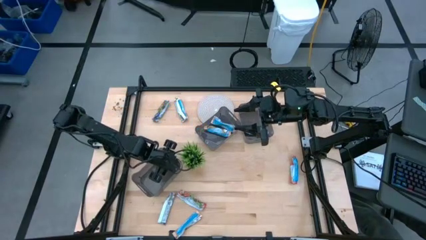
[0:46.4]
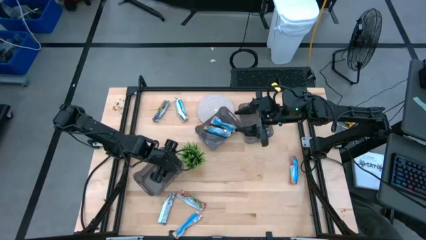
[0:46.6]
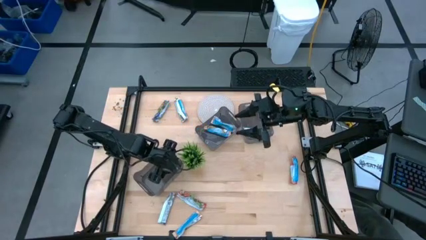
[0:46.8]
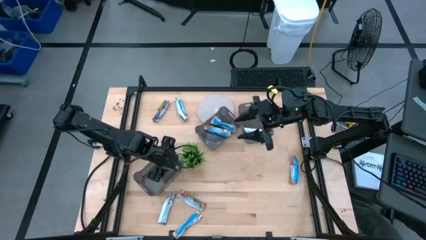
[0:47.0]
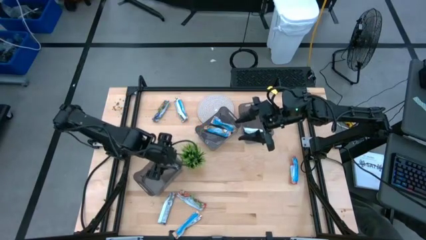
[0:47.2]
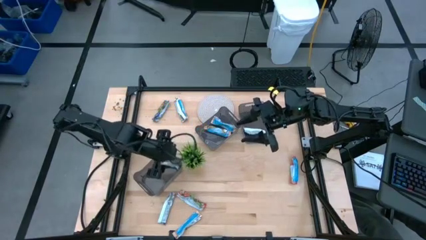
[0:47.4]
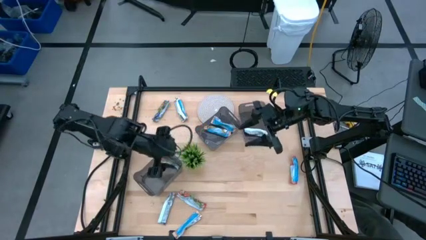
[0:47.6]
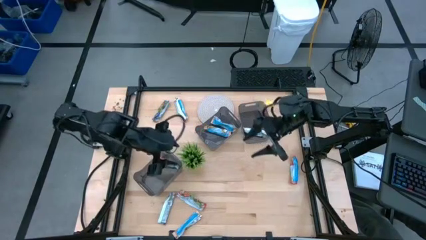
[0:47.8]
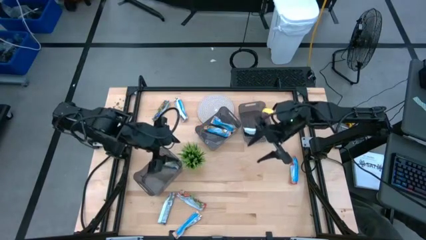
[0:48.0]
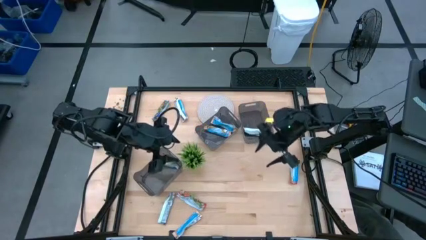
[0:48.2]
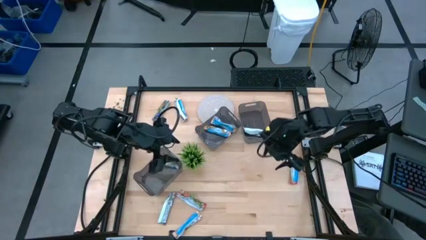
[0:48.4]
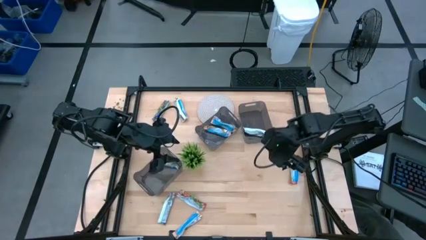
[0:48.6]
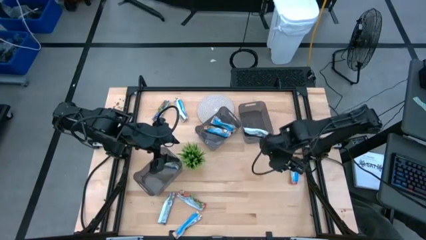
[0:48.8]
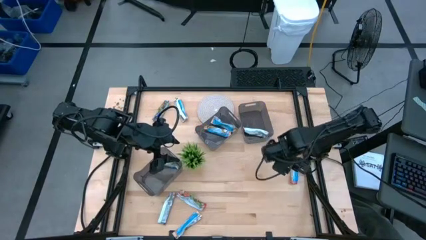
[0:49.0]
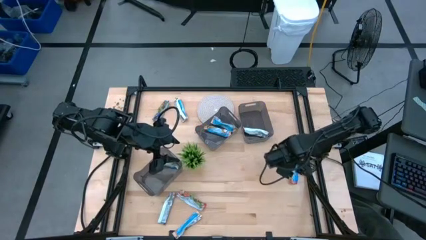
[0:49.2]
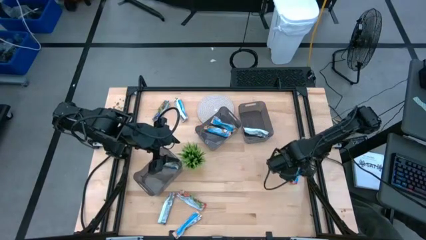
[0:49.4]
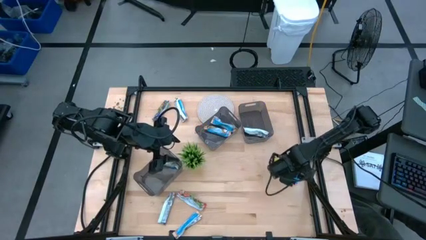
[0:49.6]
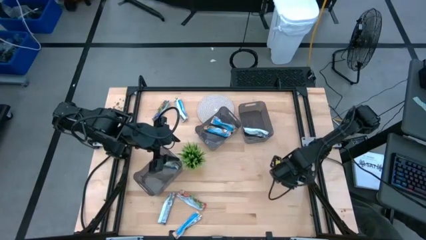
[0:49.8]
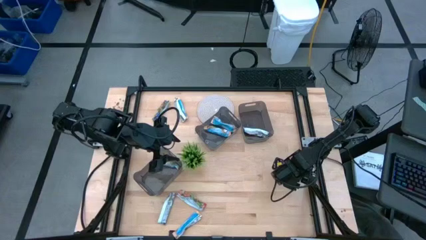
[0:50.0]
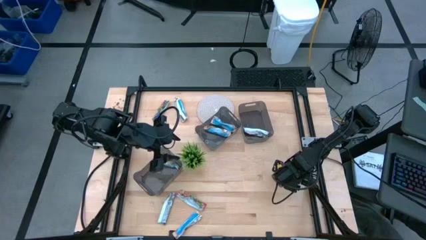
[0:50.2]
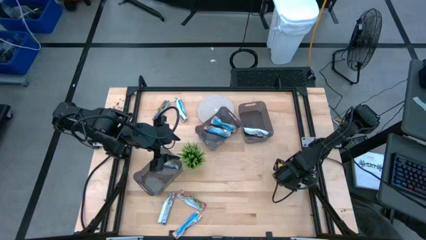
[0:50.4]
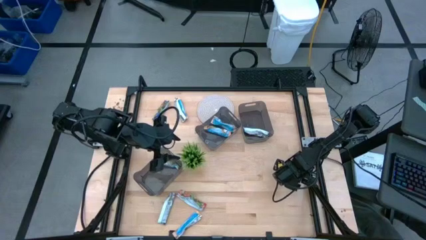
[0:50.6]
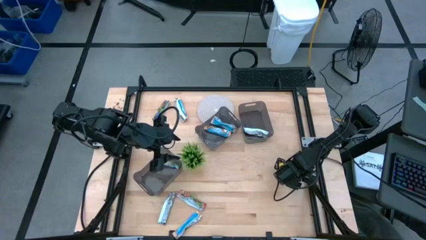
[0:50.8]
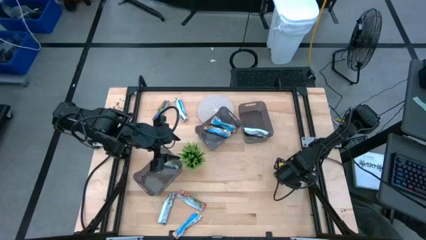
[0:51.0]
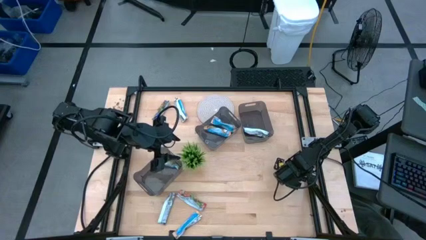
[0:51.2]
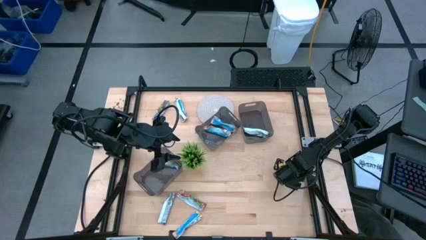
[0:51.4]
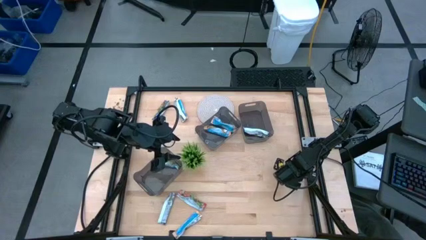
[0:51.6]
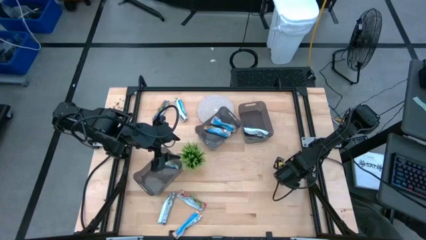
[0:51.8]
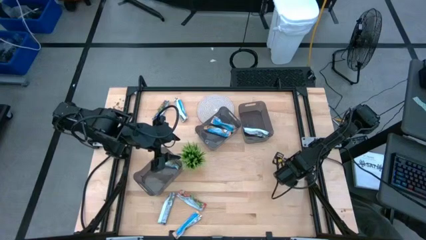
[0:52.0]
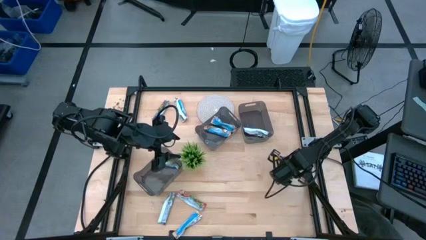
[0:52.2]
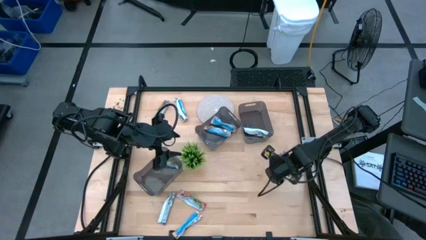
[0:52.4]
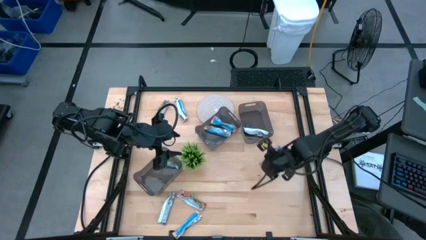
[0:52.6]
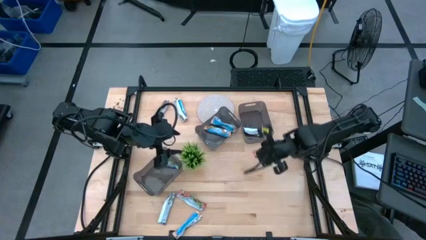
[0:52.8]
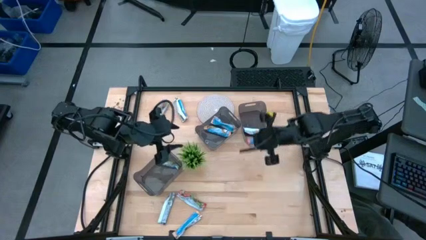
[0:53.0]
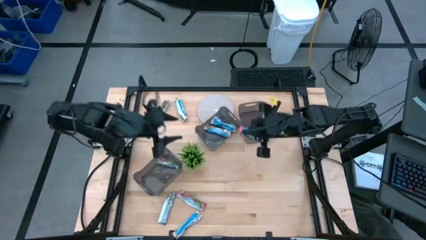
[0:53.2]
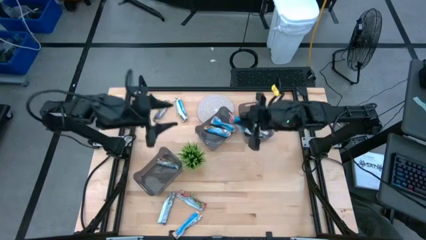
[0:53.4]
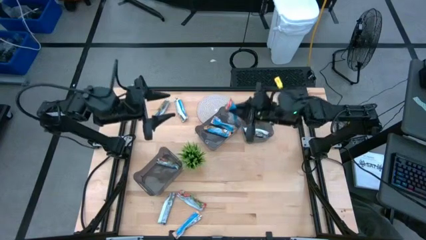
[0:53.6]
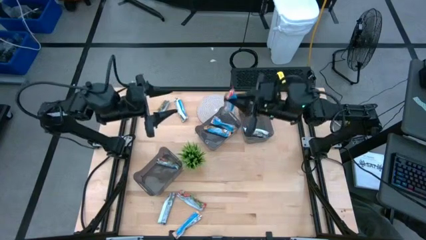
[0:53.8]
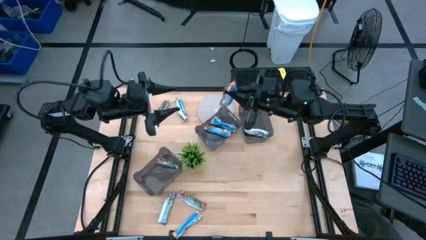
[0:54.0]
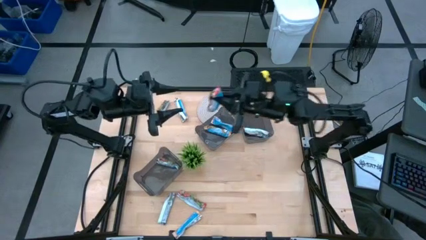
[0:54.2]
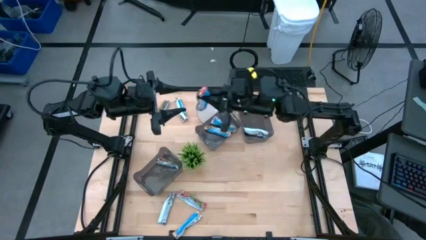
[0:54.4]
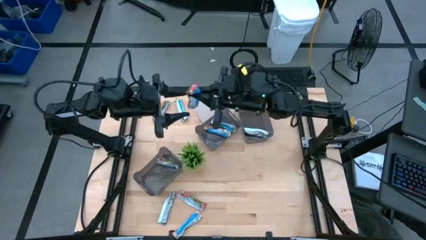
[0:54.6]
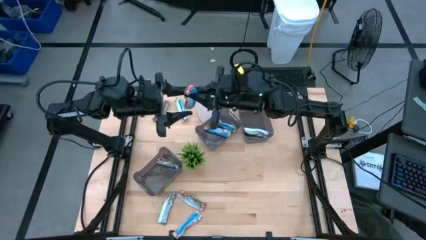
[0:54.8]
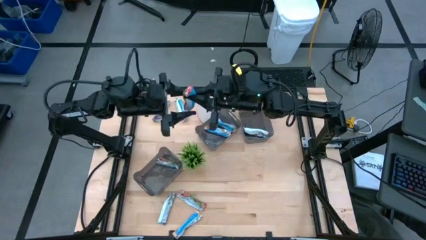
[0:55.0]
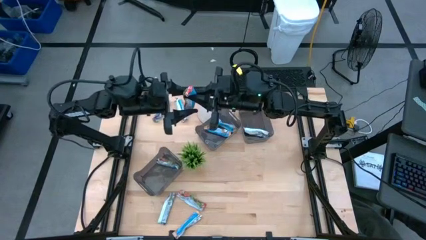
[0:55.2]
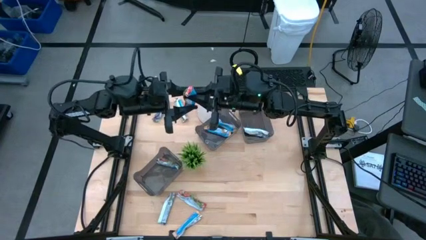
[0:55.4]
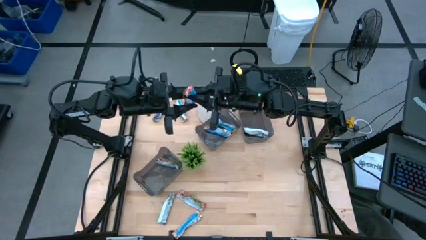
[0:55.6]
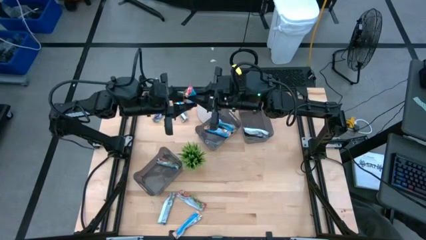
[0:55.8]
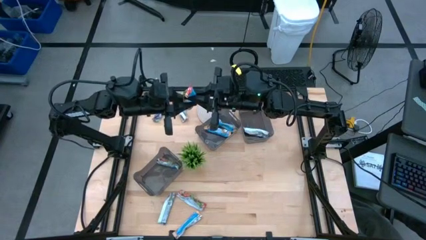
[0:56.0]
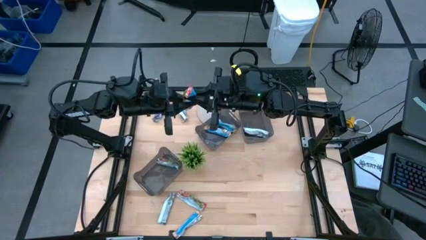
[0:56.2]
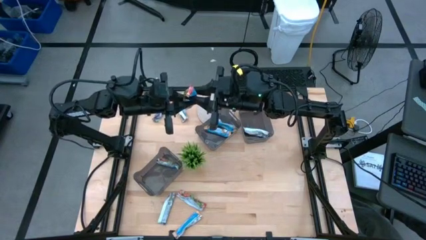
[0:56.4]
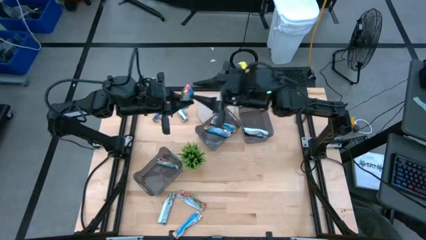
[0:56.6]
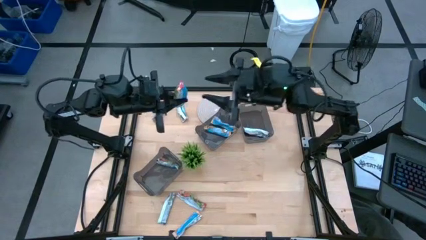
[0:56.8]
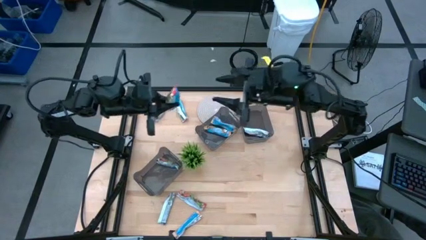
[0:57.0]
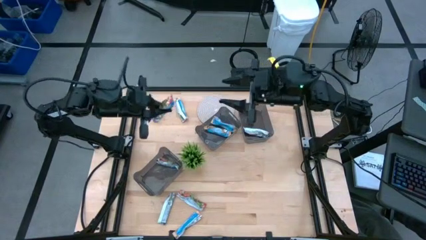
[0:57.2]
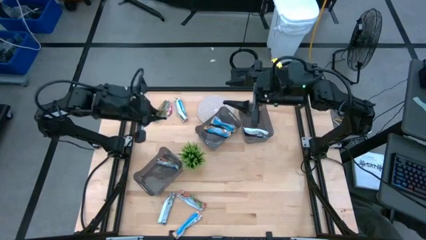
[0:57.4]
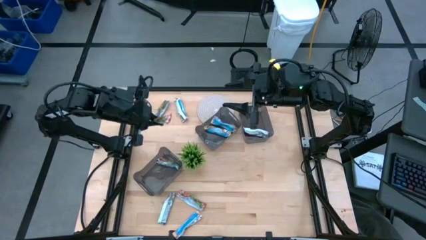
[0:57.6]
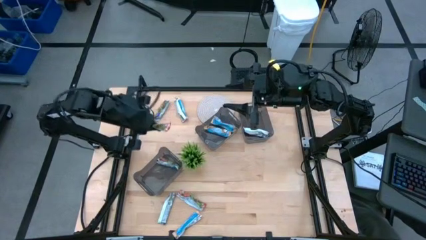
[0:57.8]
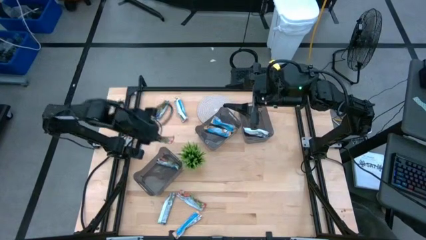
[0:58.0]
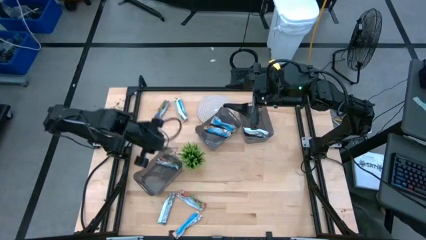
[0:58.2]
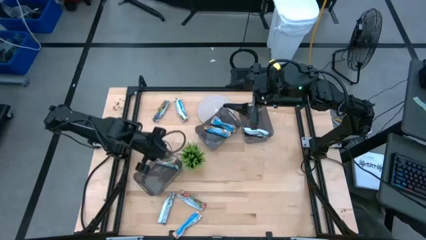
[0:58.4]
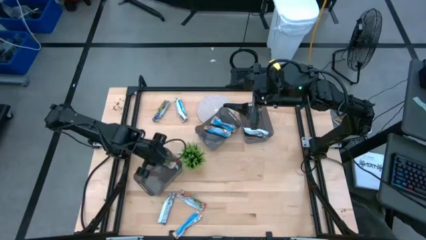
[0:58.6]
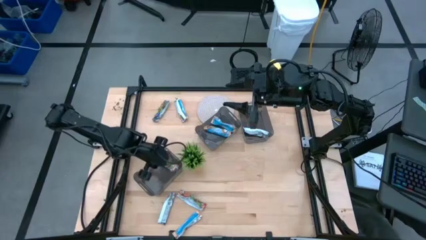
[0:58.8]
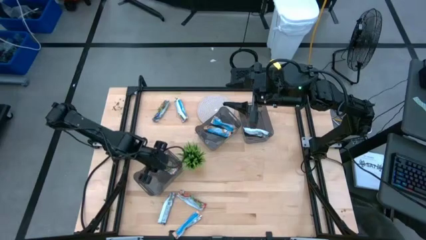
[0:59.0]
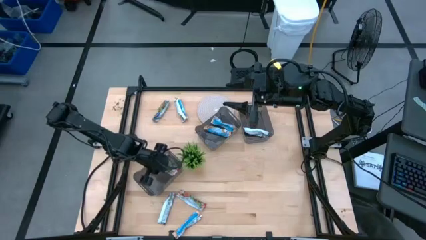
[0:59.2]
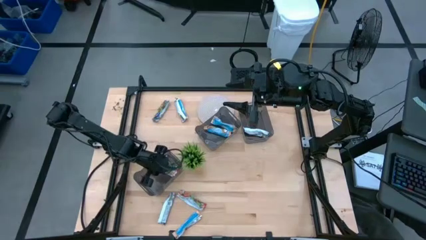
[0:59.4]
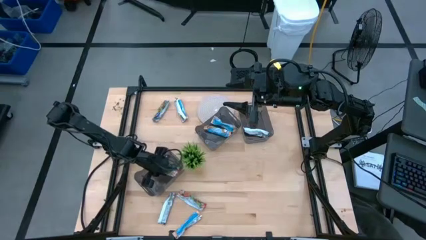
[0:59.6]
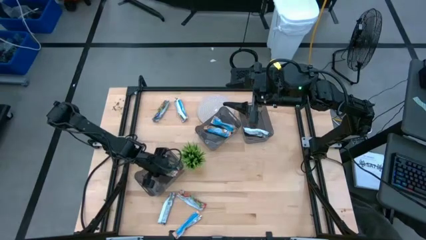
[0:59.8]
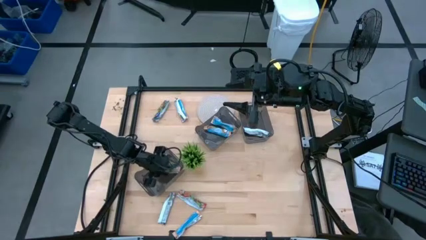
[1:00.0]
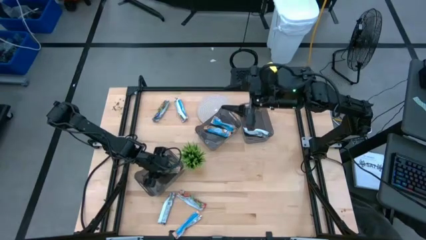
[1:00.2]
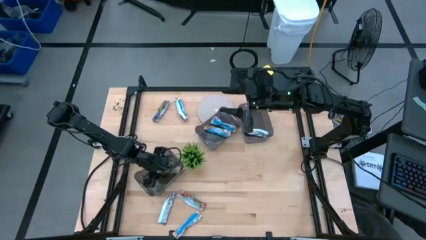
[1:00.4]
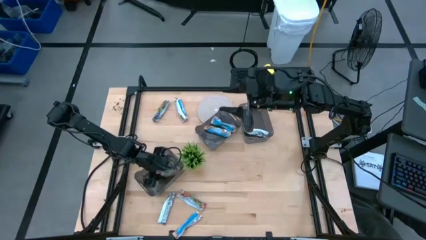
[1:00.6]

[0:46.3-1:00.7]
Task: Pick and place Granola Bars by type
Put the red granola bar into the bottom black bin

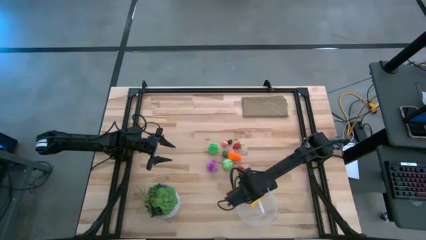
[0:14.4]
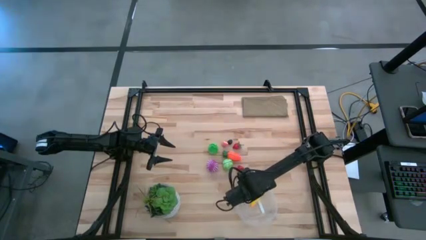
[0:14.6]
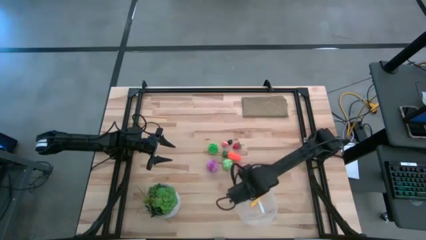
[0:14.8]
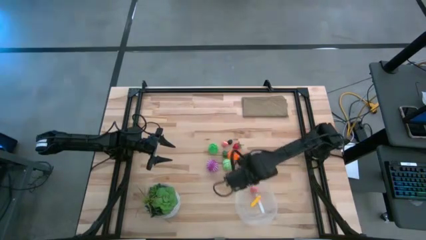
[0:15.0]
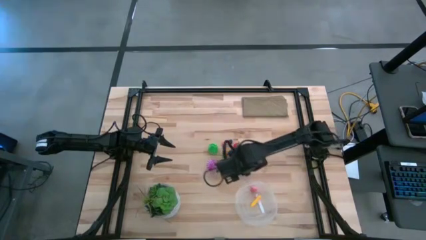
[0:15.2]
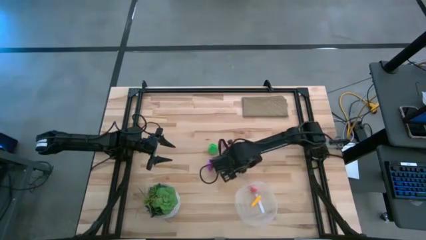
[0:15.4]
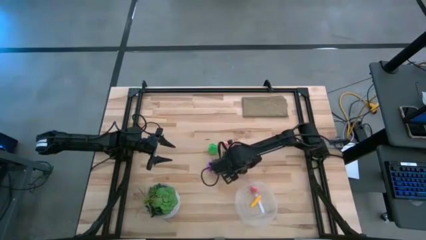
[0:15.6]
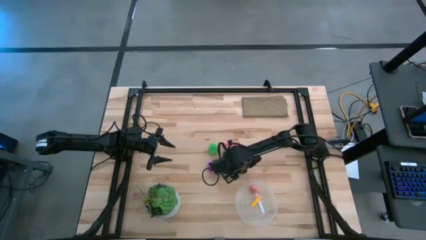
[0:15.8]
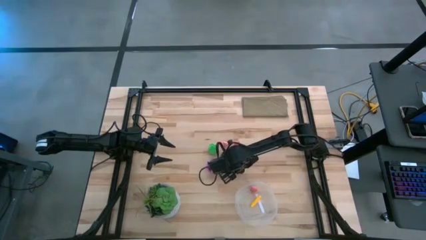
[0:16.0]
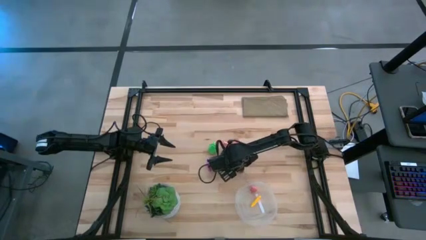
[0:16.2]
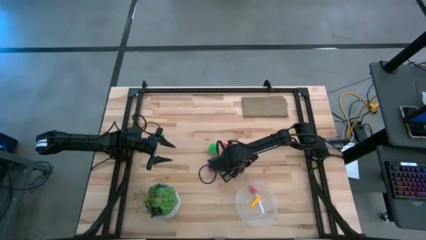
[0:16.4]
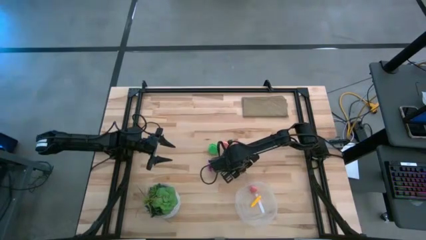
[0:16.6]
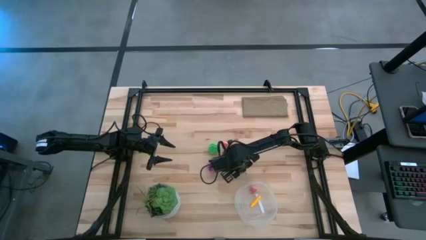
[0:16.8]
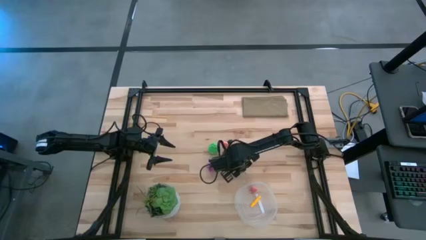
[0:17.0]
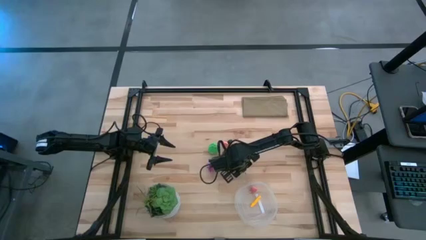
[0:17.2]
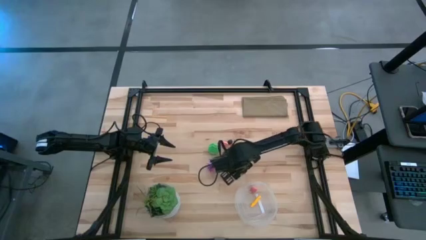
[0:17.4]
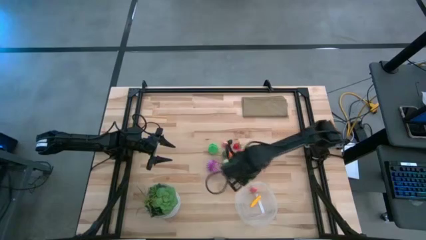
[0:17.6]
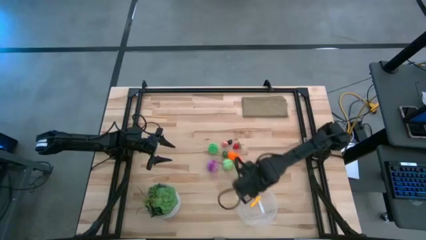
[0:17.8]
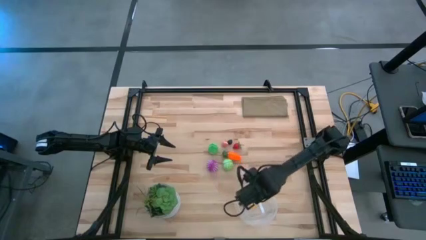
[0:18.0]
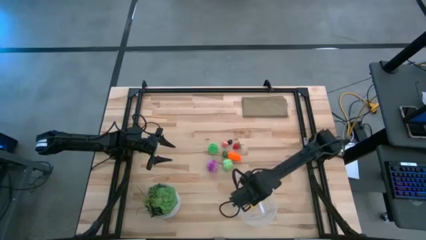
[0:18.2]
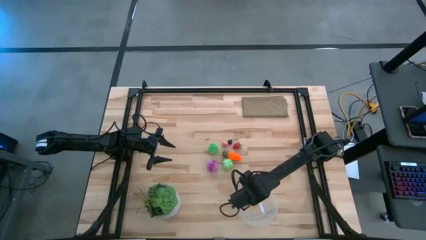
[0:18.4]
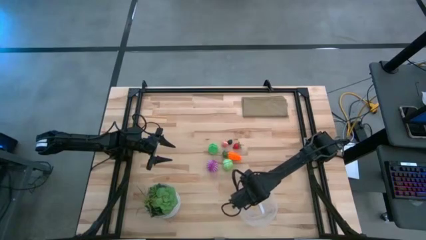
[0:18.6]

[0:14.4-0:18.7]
Task: Pick and placing Produce into tupperware
Put the bottom red strawberry into the transparent container
